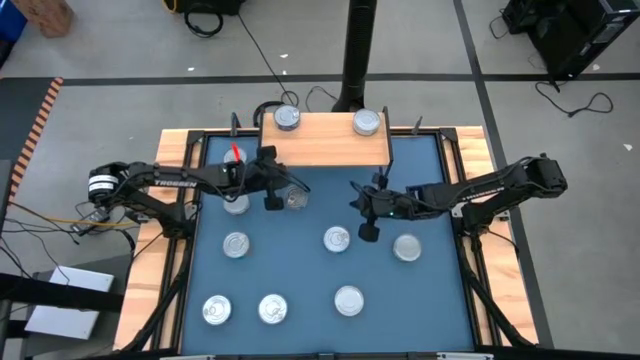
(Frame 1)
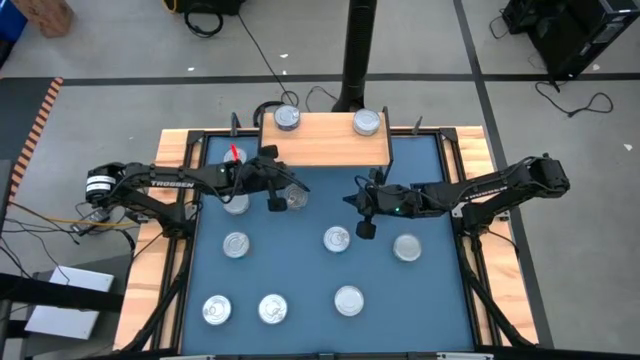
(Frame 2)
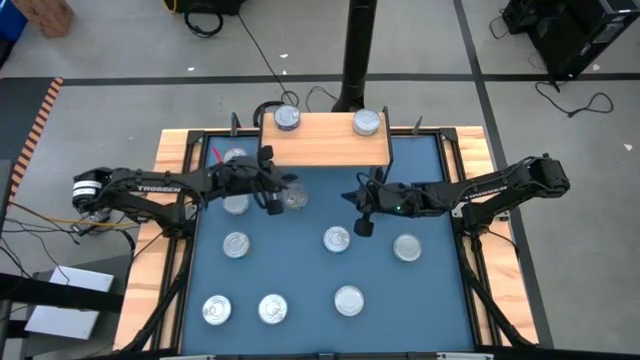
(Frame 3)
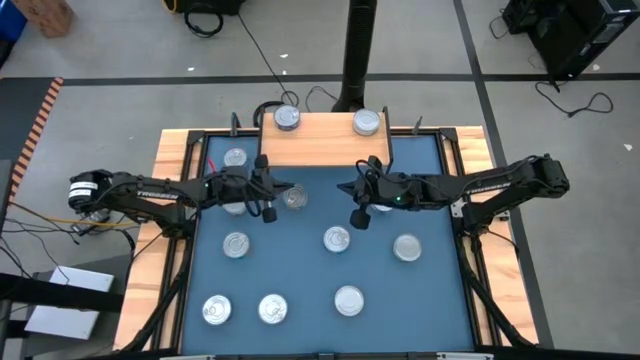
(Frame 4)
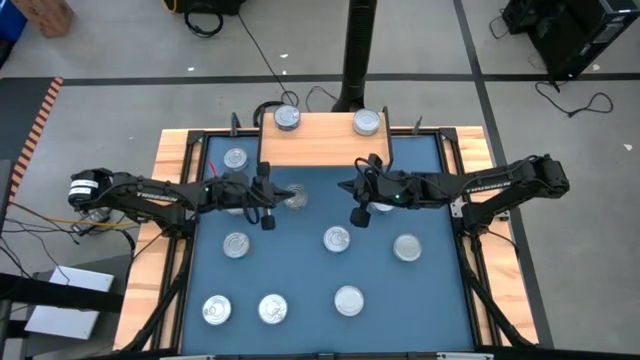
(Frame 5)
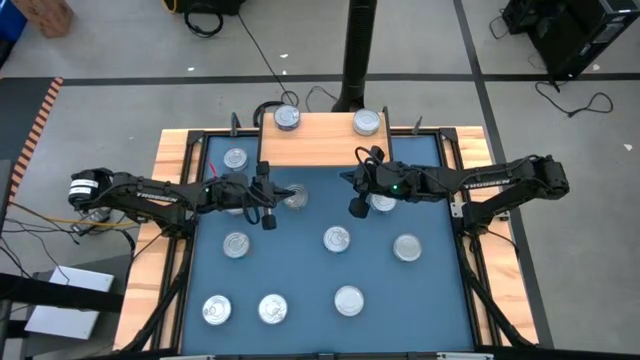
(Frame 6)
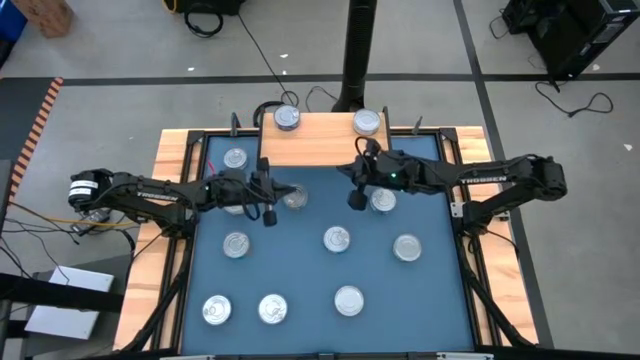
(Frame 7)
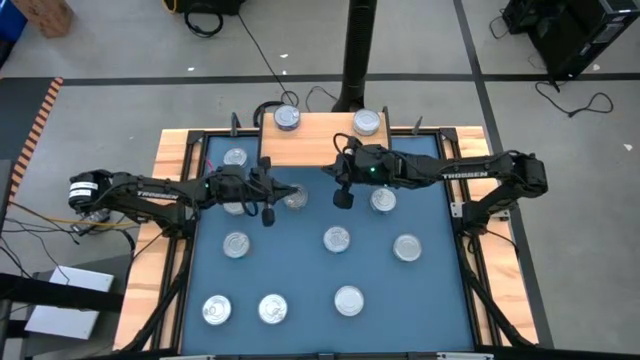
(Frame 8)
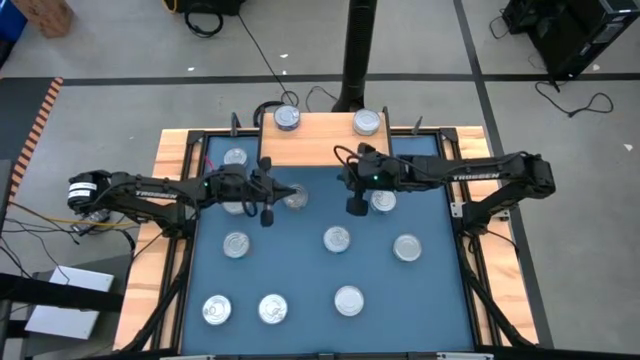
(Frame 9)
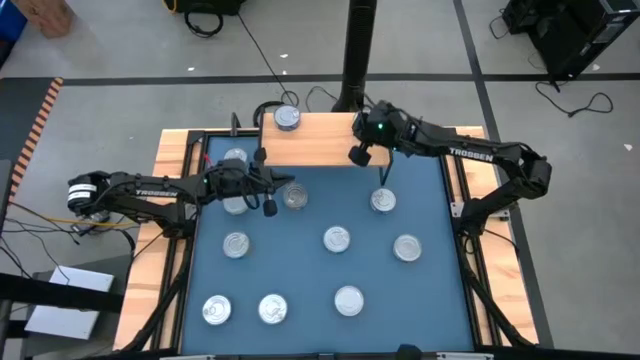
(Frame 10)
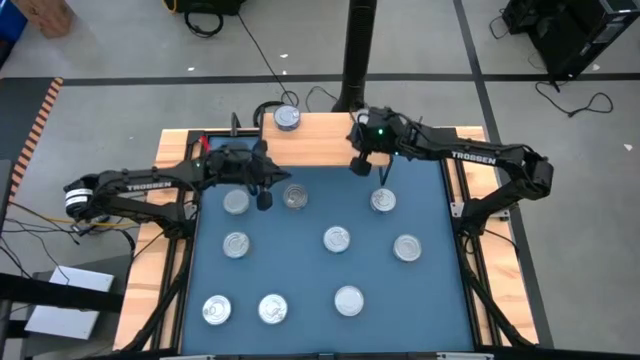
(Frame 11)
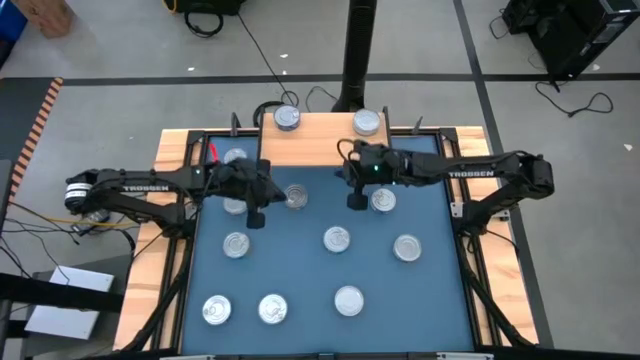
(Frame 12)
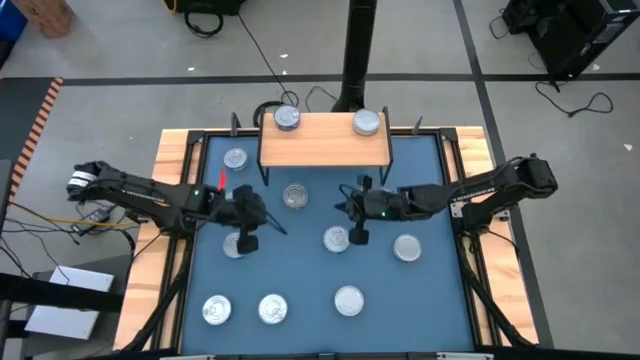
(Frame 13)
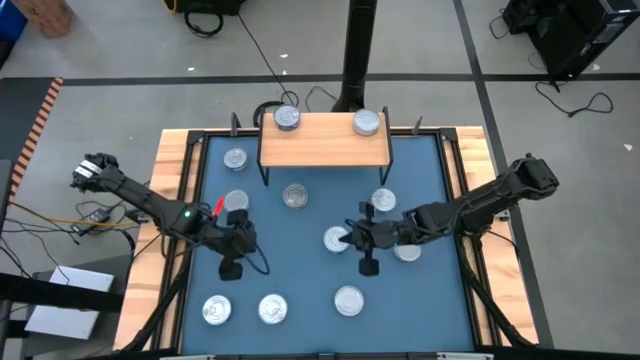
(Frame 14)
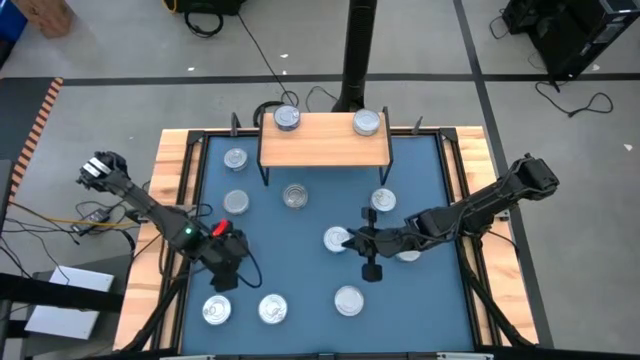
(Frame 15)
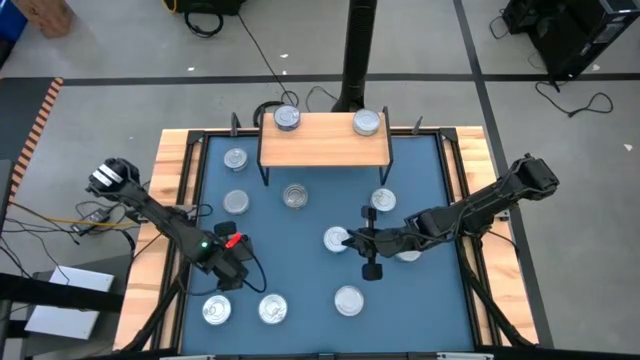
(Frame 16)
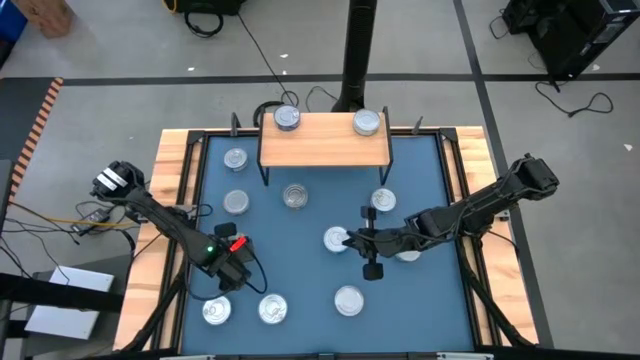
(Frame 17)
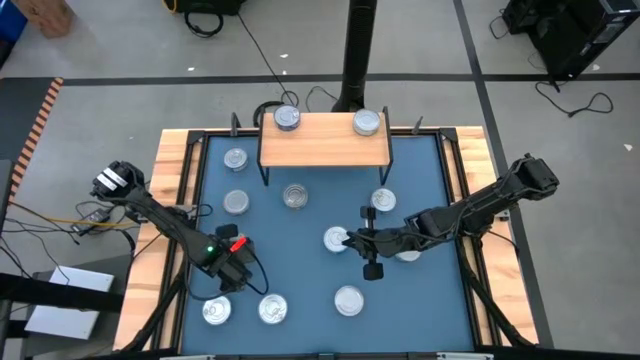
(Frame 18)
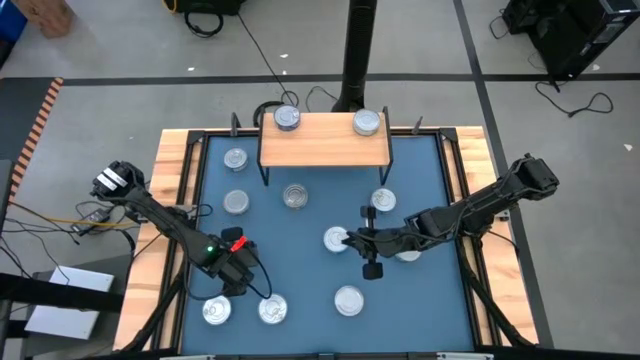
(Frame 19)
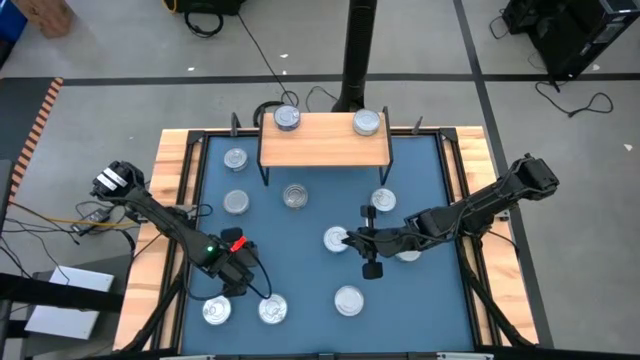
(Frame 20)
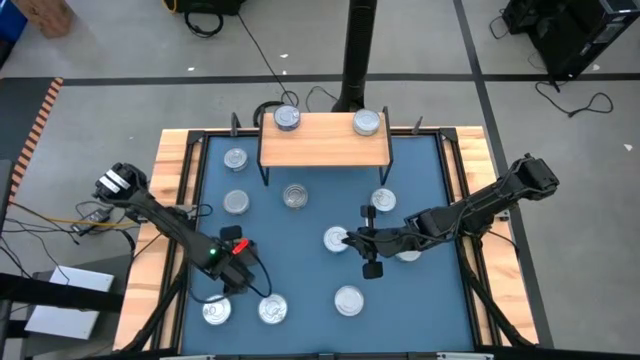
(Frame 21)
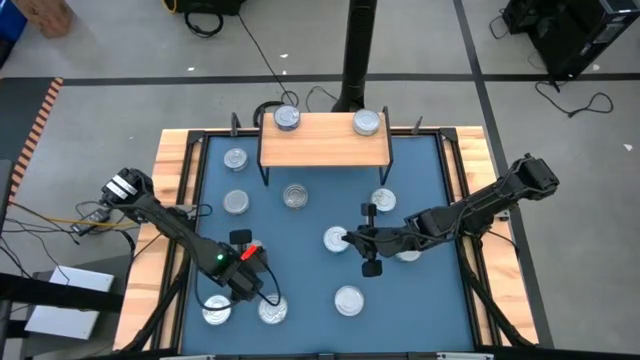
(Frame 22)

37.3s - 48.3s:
Task: Stack canned seafood by type on shelf
Put the light blue tuna can on the shelf

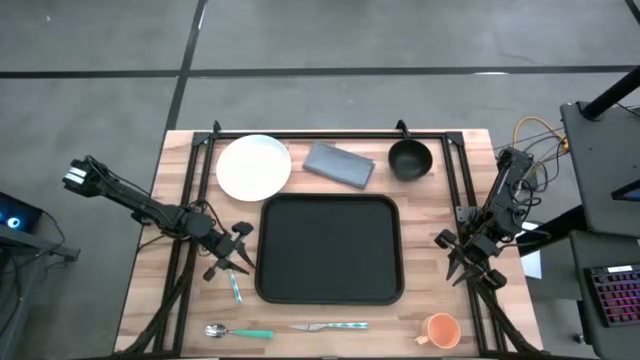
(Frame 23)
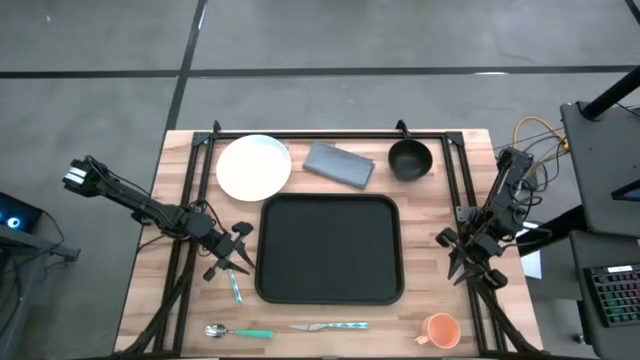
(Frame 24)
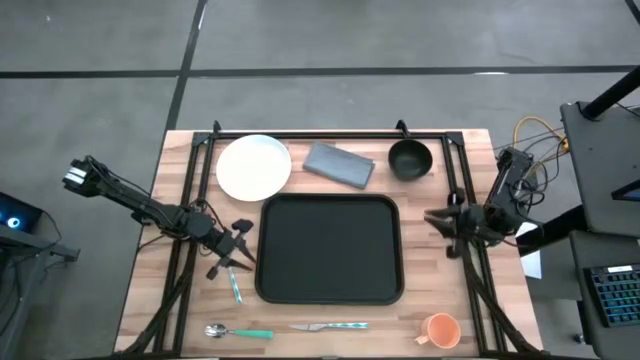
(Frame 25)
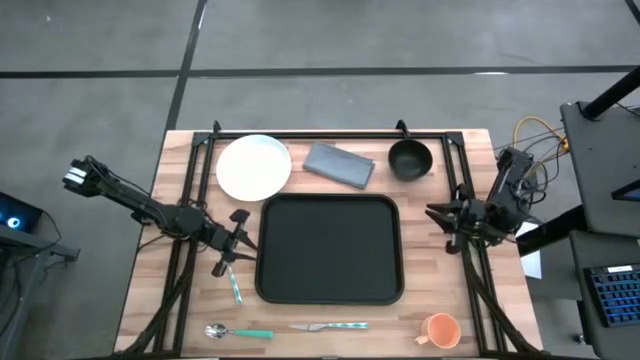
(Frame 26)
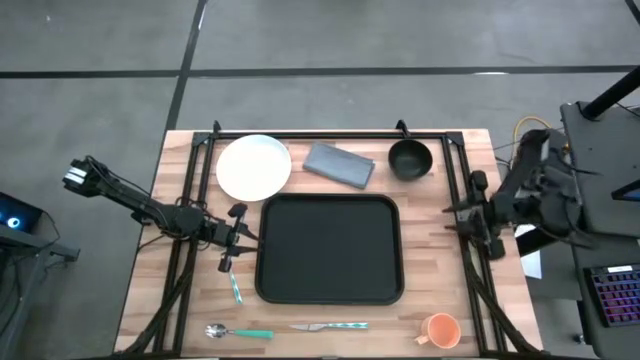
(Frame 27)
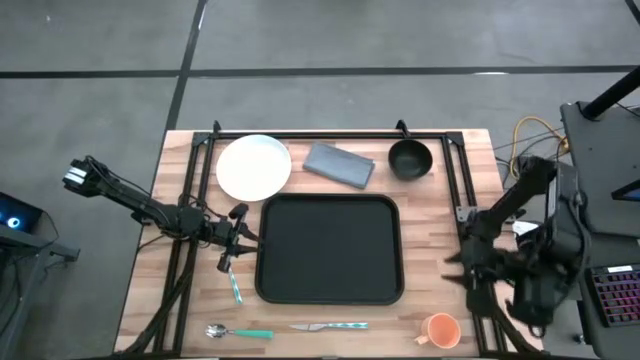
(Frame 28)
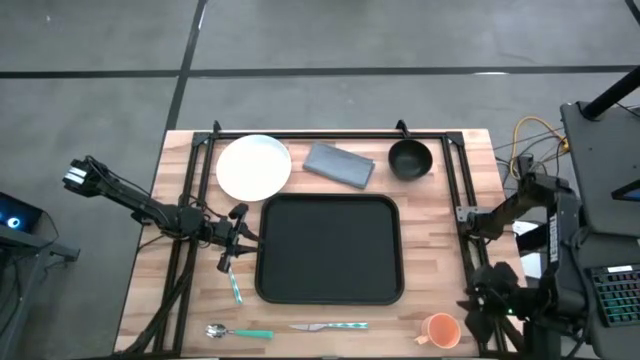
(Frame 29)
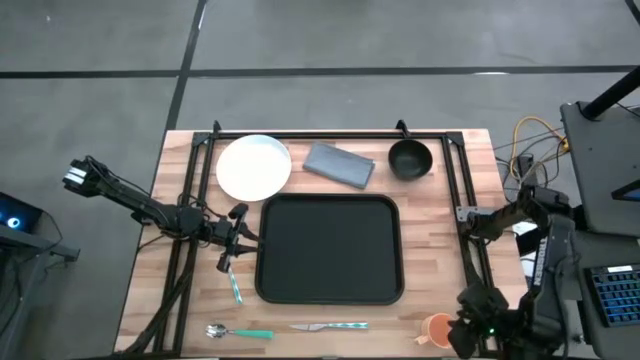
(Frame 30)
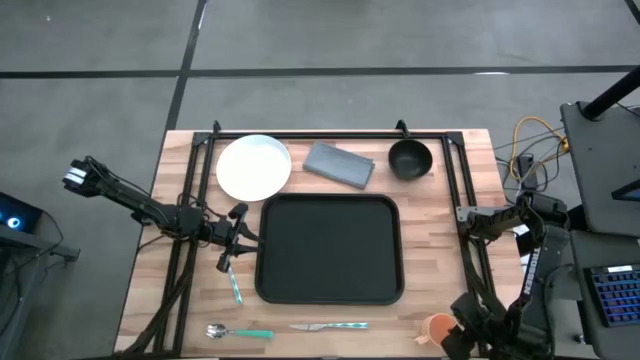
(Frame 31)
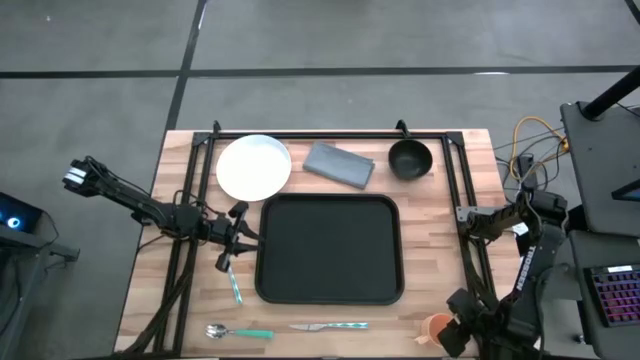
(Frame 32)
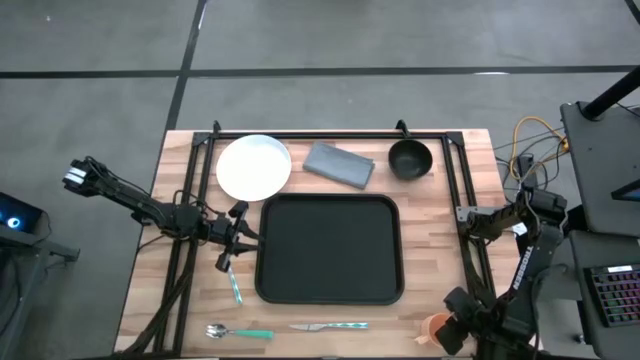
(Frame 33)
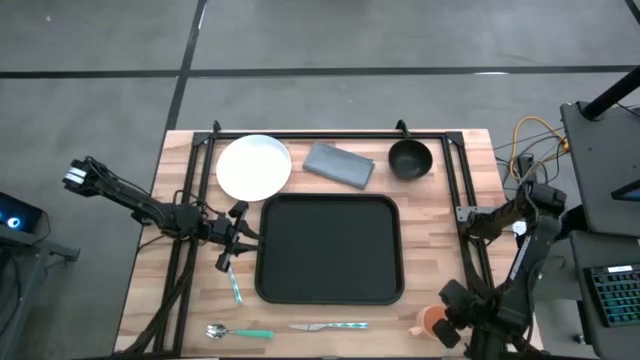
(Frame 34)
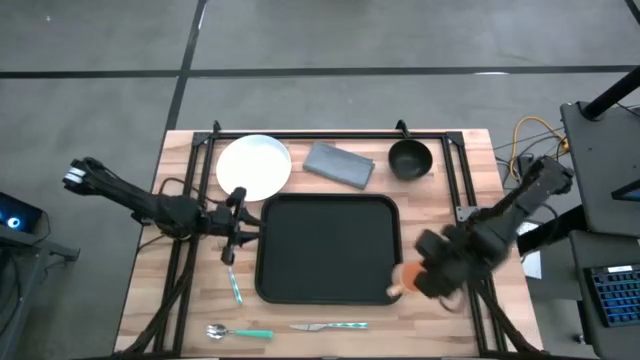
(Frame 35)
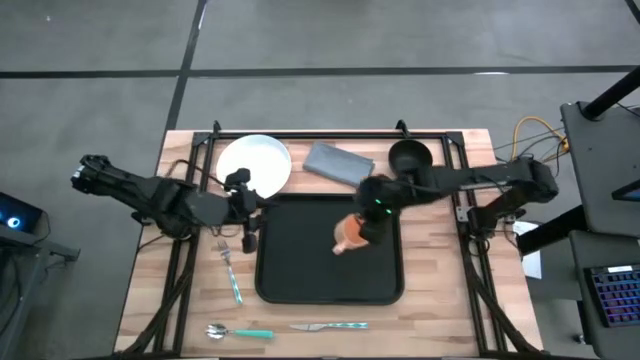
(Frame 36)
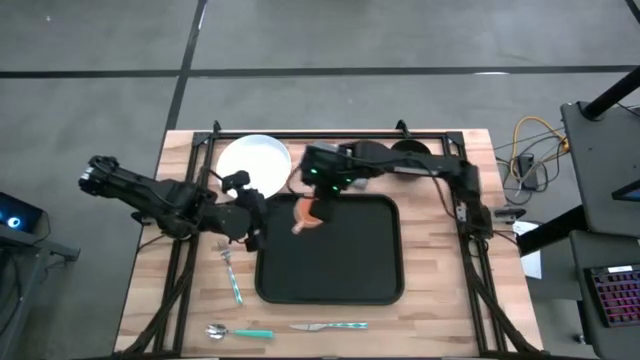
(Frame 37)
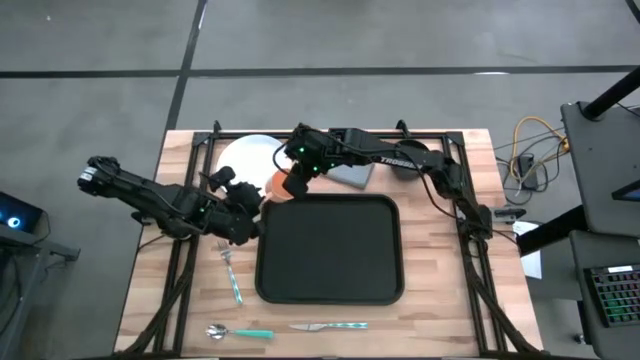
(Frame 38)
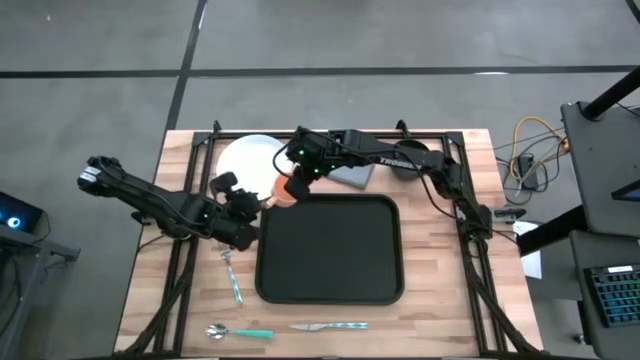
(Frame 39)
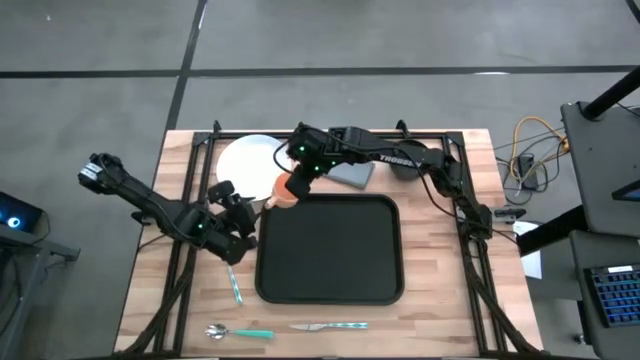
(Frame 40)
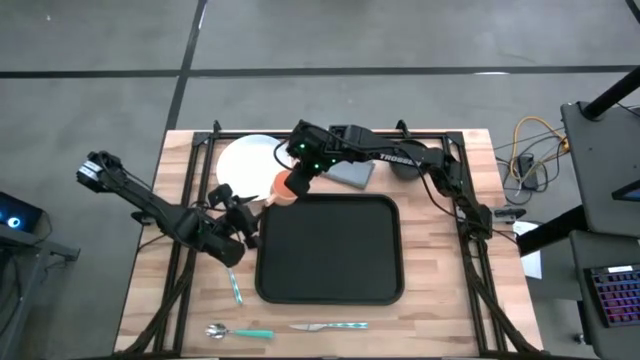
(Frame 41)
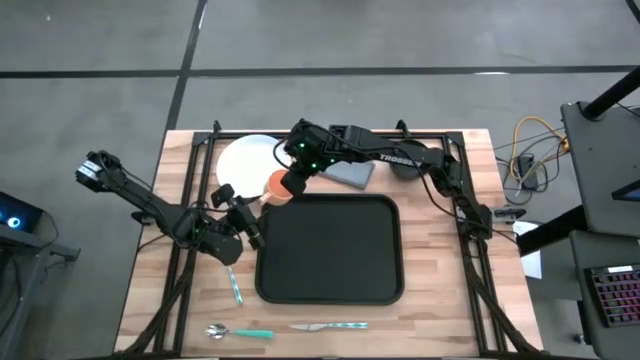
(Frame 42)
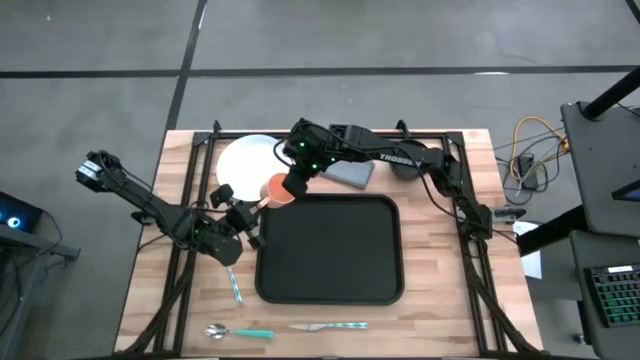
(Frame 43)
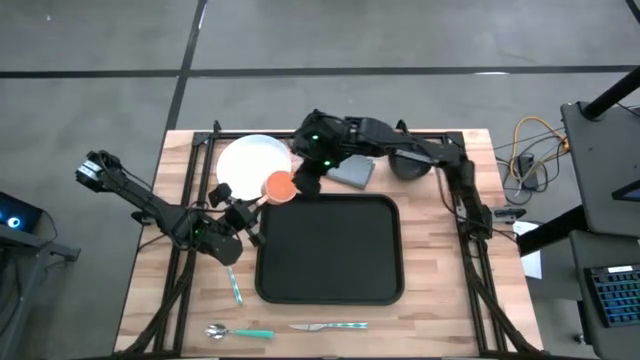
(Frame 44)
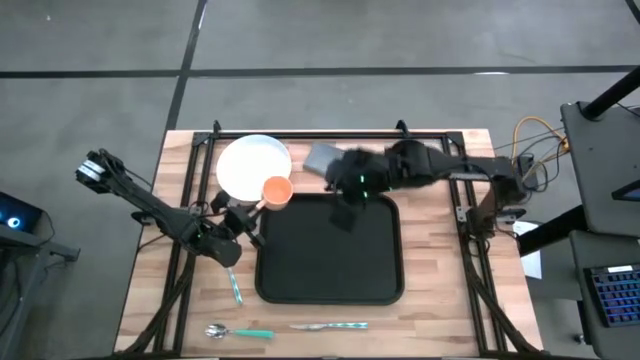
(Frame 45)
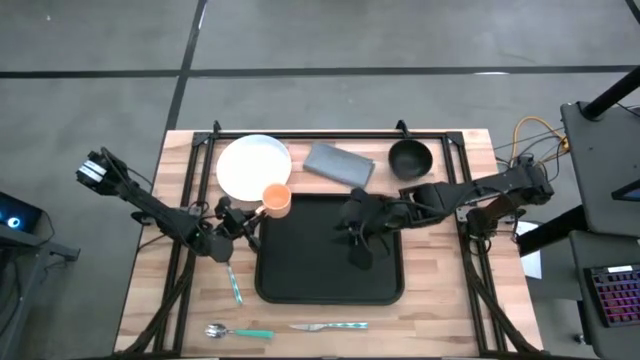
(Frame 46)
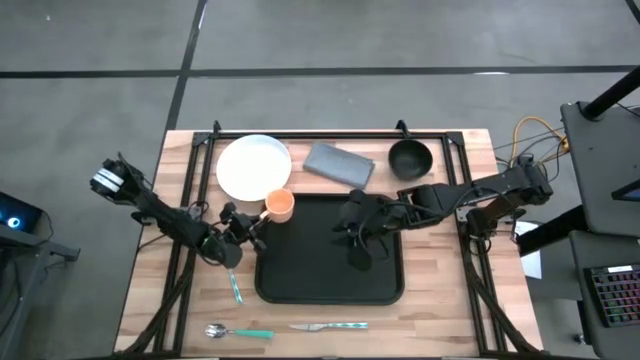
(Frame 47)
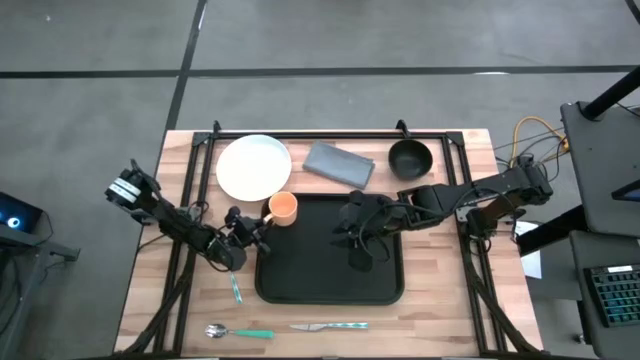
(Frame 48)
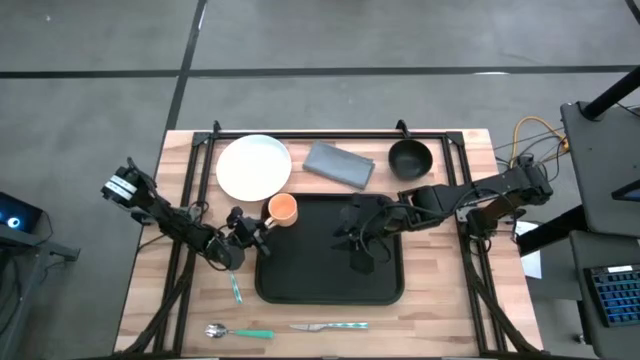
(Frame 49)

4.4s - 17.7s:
Task: Set up tray
Put the orange mug on the black serving tray
